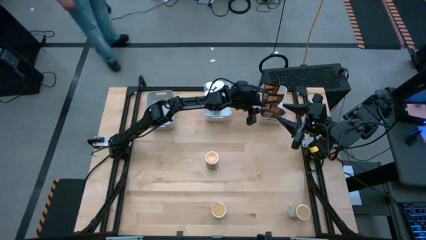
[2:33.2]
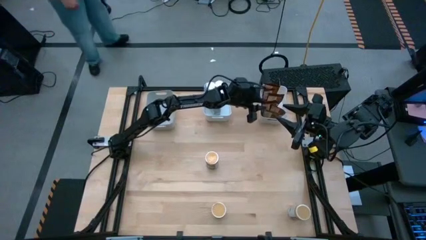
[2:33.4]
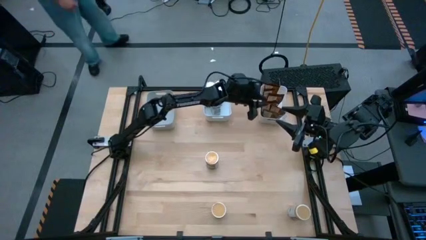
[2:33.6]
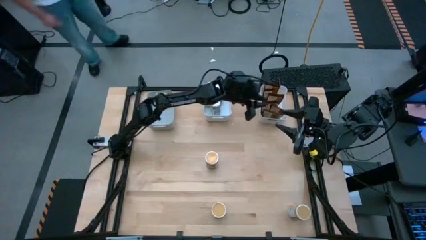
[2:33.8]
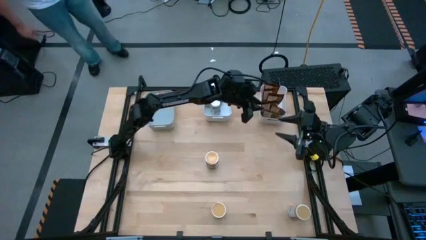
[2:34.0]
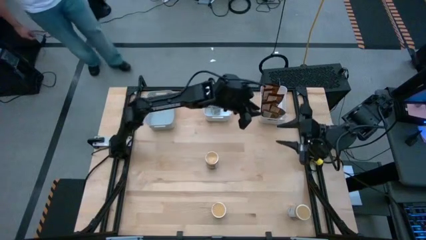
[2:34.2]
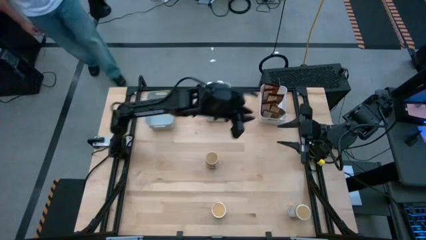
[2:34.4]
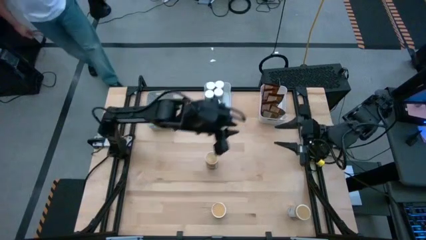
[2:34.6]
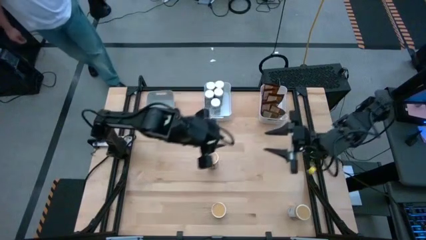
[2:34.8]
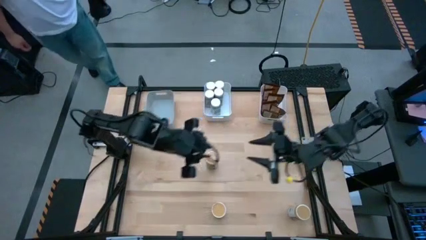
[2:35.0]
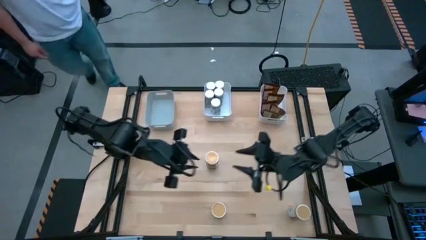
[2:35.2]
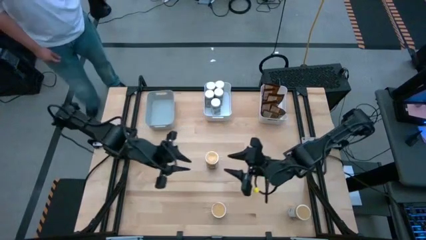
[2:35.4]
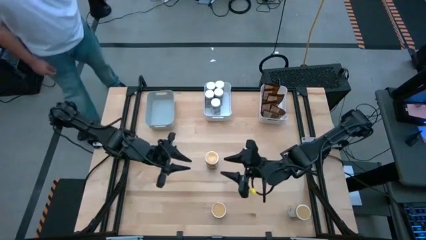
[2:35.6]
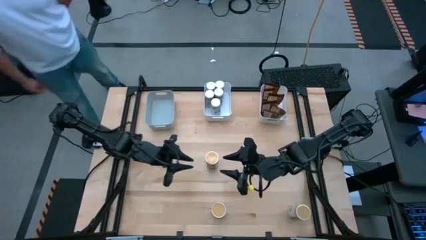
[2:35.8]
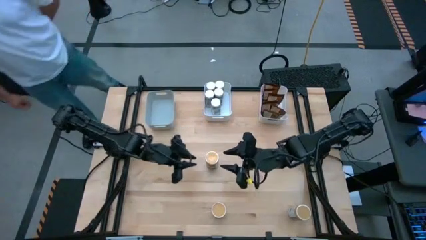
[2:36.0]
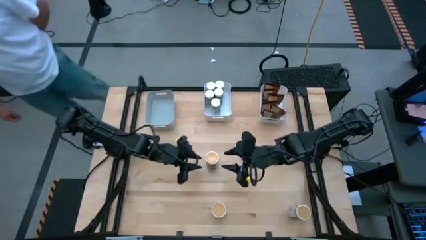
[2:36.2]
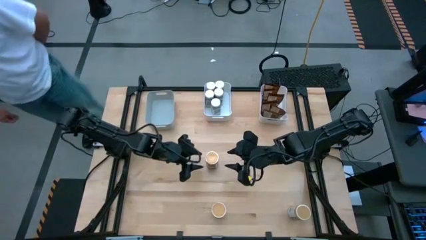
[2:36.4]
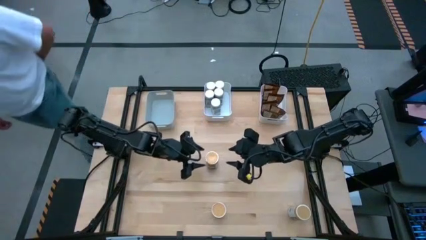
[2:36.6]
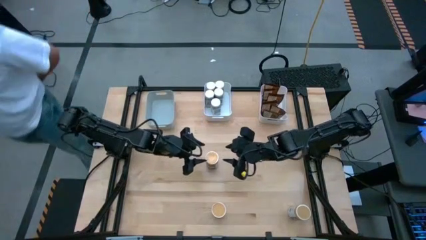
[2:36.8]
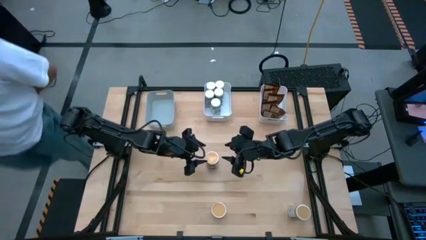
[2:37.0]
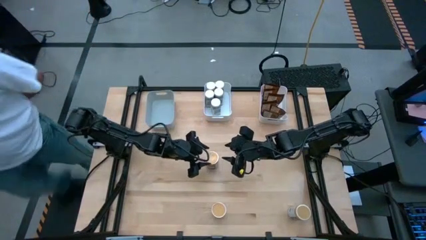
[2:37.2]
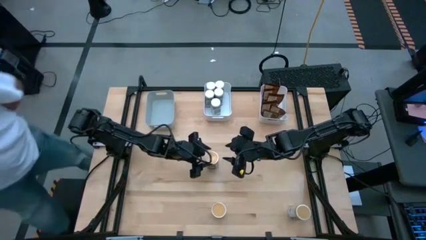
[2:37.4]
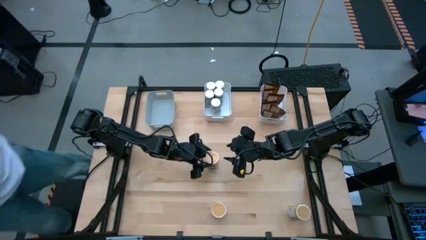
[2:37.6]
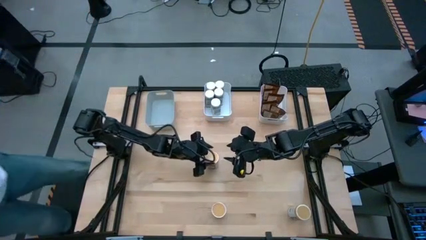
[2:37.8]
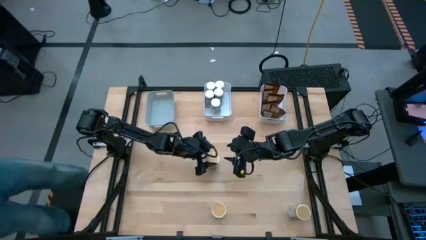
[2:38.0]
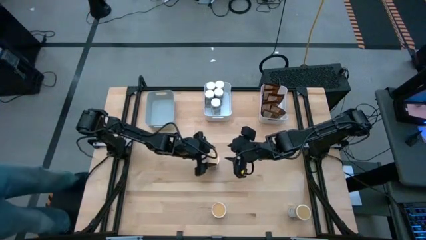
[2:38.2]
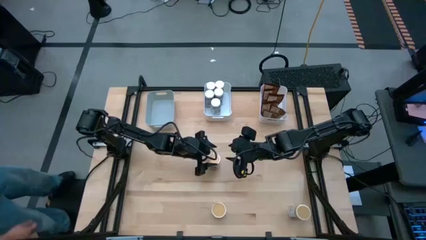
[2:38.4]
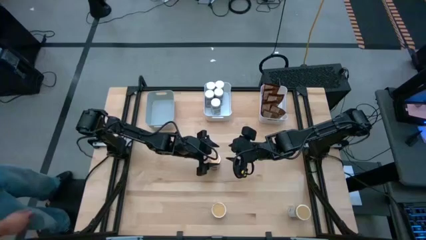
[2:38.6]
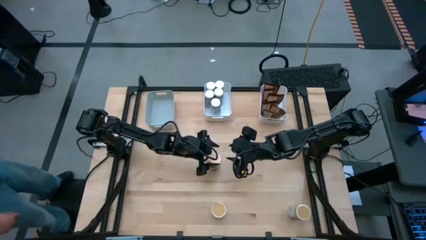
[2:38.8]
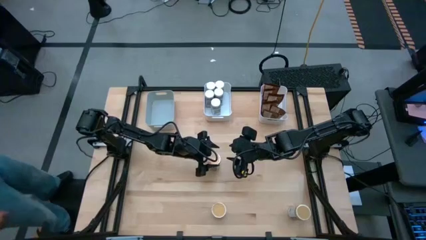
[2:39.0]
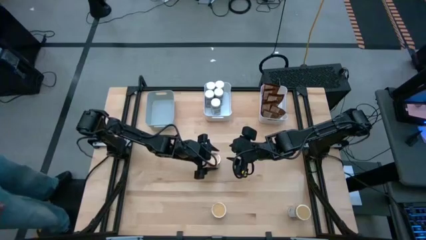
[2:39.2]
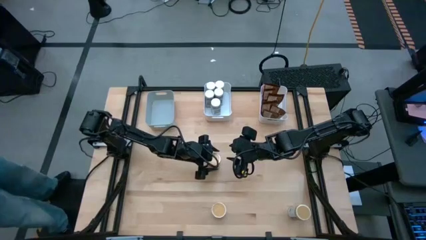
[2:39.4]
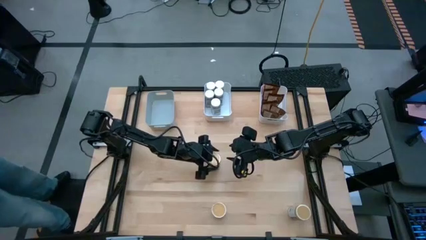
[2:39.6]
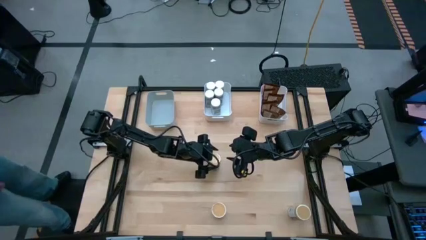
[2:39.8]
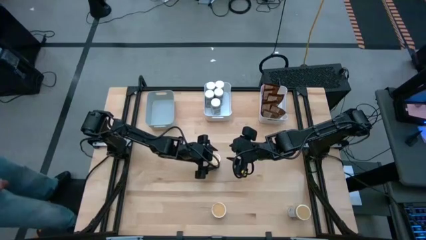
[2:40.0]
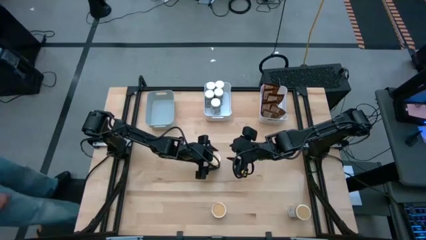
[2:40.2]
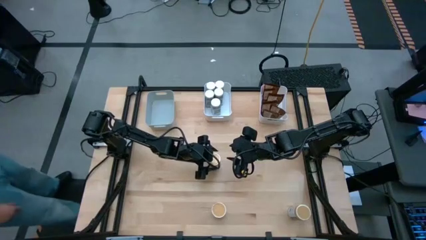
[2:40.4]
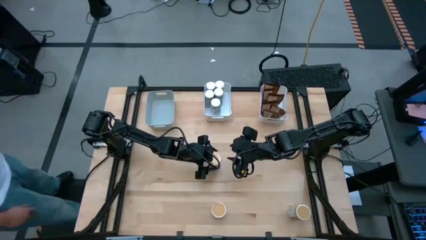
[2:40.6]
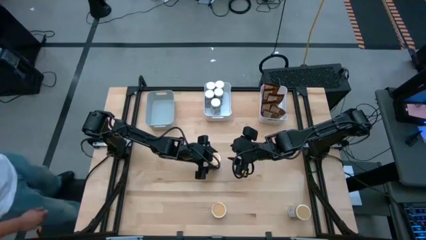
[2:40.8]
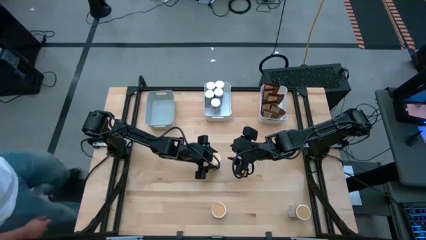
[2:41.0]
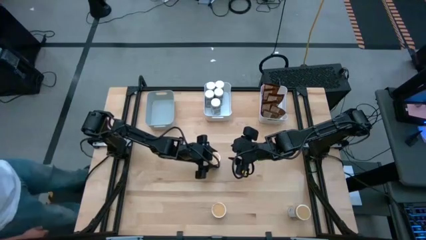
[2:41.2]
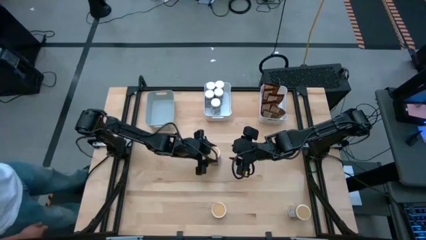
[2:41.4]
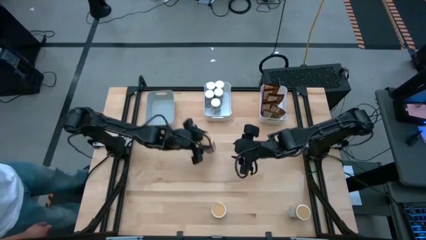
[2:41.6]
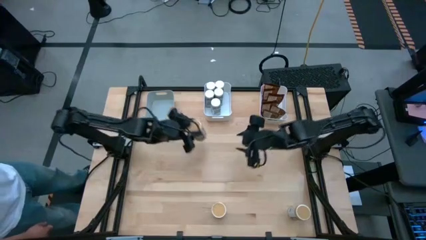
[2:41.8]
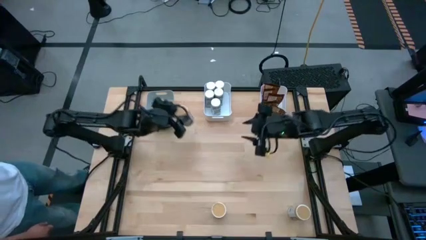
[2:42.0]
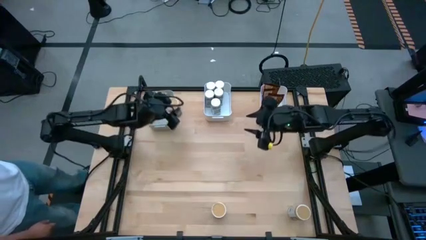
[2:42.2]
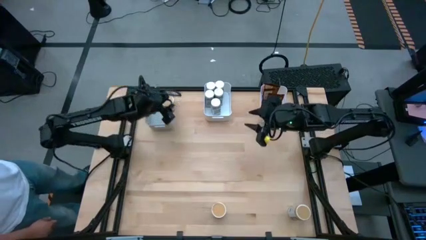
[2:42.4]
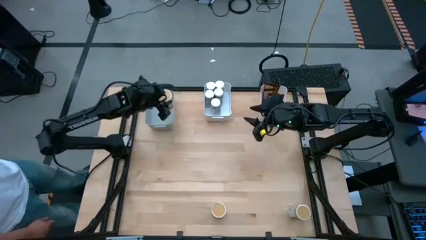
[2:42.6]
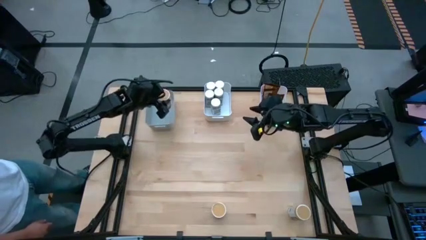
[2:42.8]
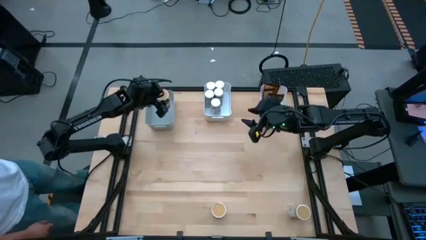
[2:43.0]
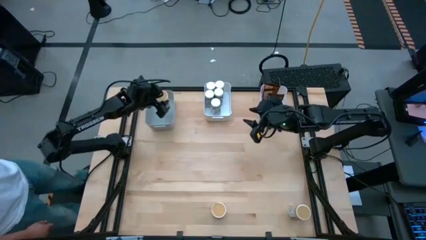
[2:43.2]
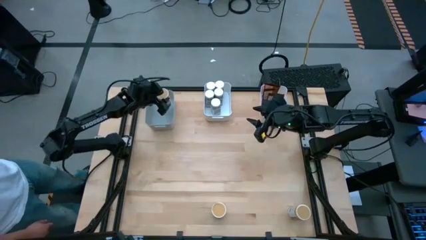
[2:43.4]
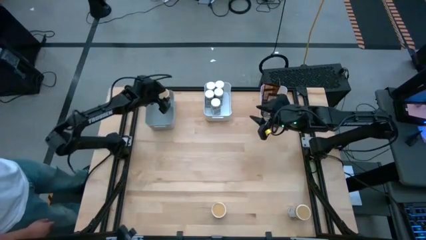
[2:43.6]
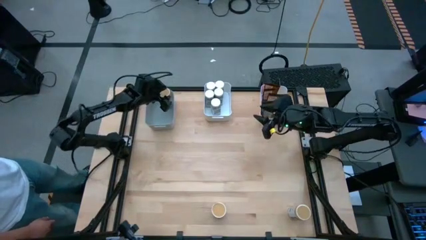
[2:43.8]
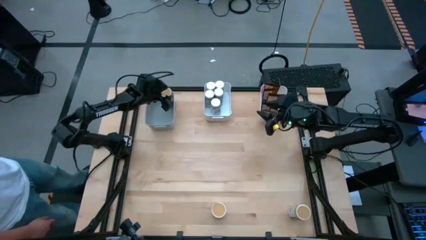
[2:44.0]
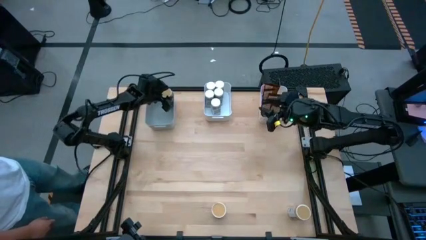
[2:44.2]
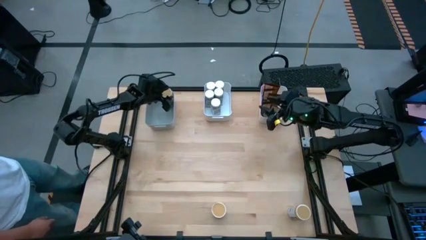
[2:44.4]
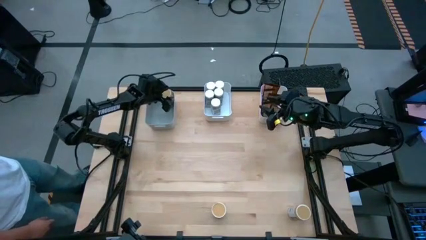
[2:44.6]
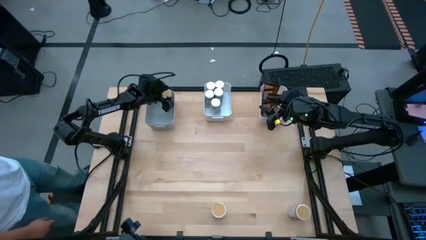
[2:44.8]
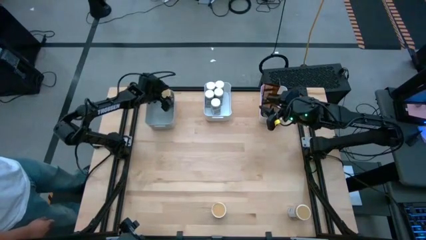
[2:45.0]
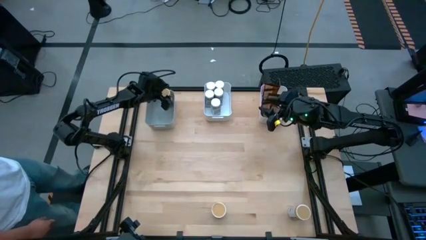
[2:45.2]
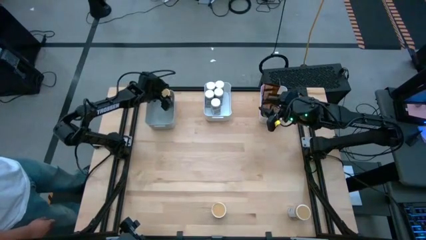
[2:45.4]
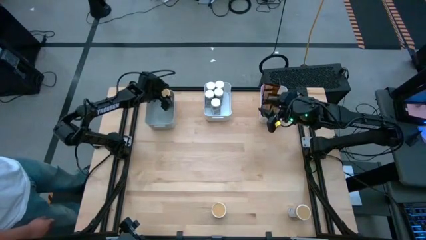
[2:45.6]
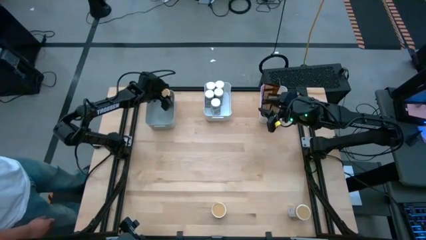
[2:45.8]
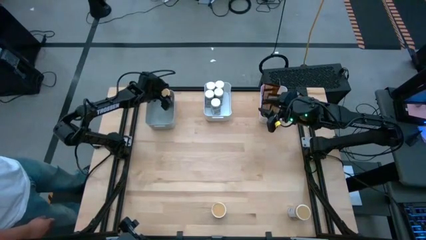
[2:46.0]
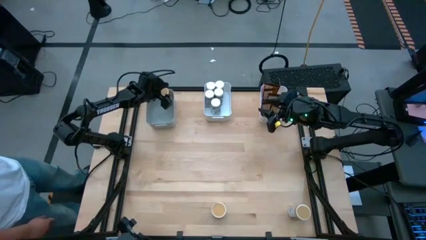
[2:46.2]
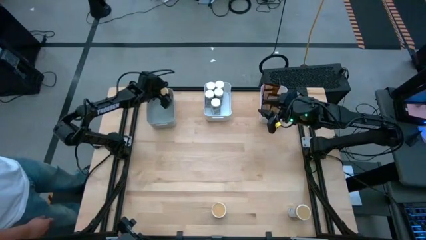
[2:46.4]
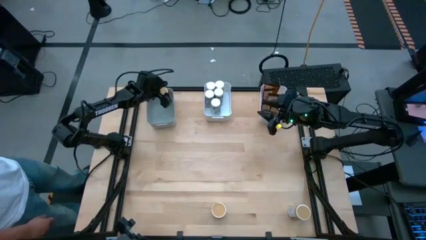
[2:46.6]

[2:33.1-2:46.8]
Task: Sort spices by type
Put the gold seasoning bottle into the gray bin

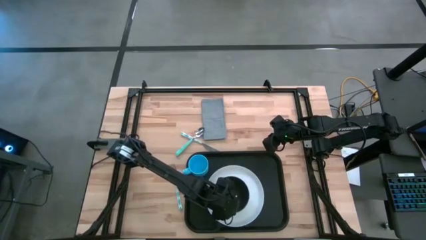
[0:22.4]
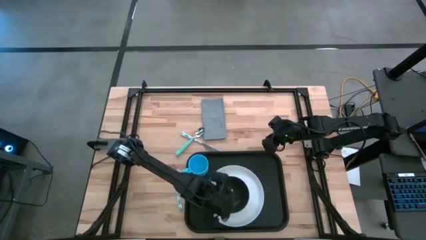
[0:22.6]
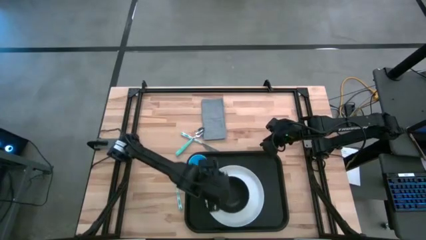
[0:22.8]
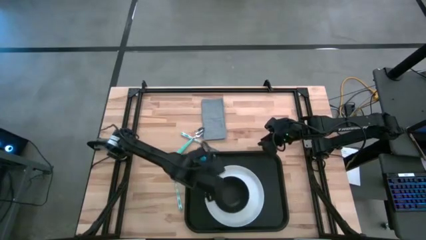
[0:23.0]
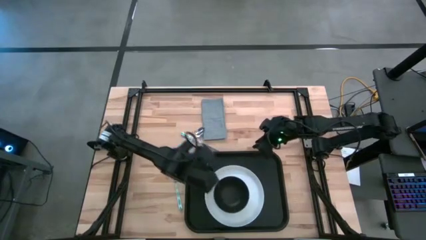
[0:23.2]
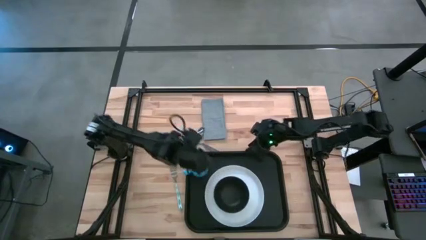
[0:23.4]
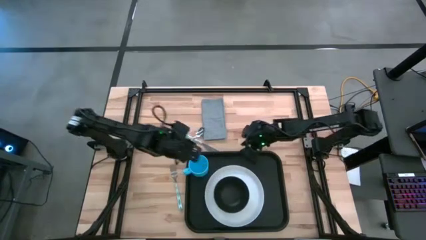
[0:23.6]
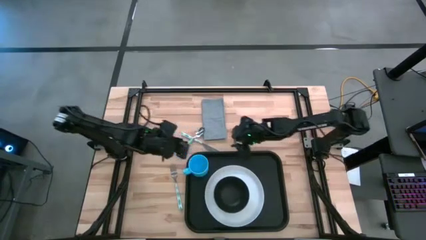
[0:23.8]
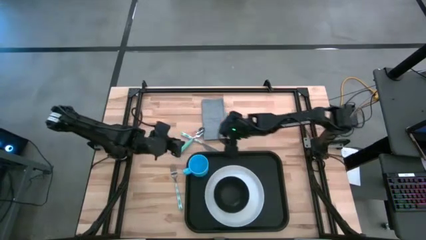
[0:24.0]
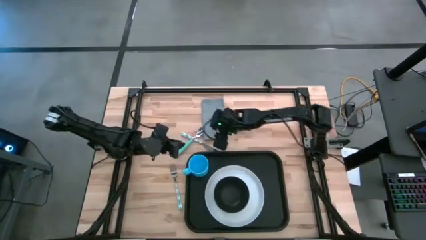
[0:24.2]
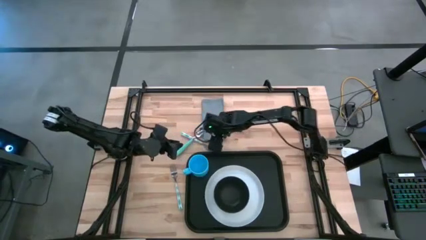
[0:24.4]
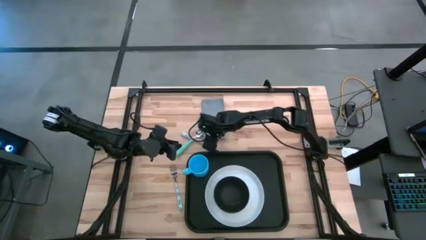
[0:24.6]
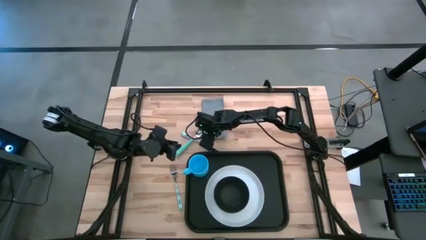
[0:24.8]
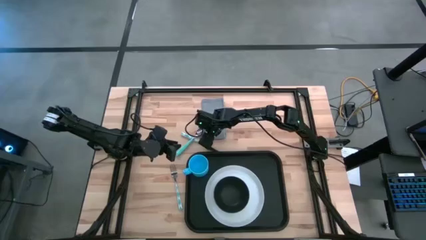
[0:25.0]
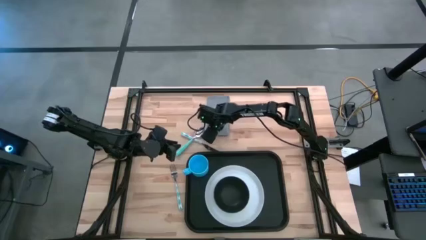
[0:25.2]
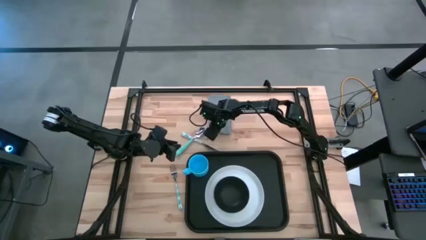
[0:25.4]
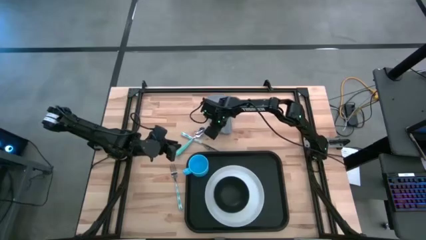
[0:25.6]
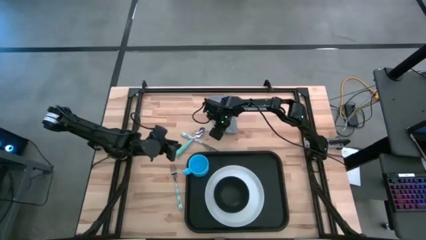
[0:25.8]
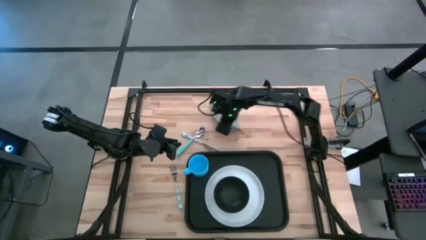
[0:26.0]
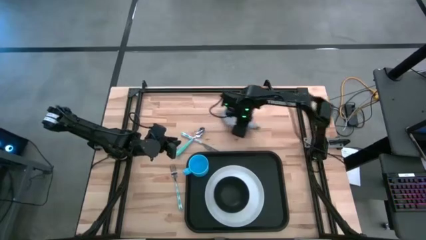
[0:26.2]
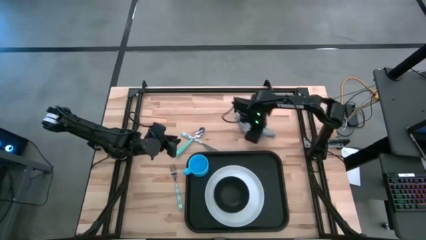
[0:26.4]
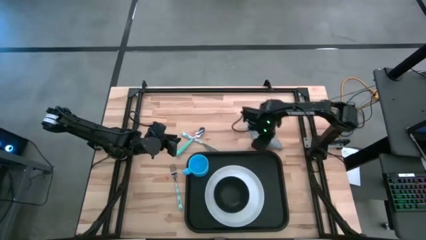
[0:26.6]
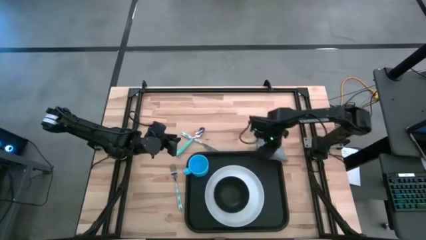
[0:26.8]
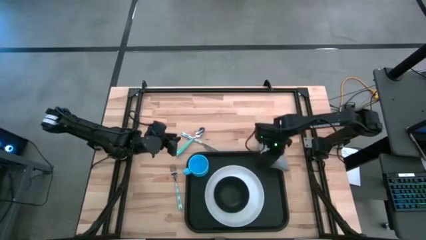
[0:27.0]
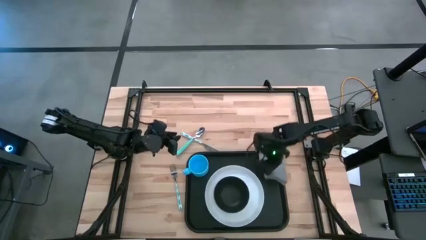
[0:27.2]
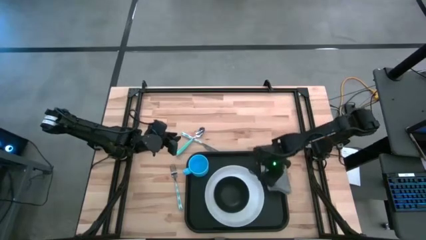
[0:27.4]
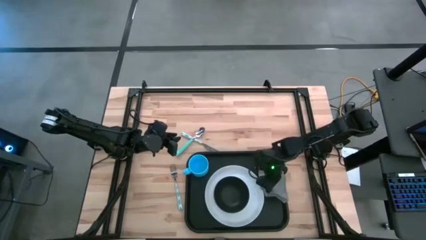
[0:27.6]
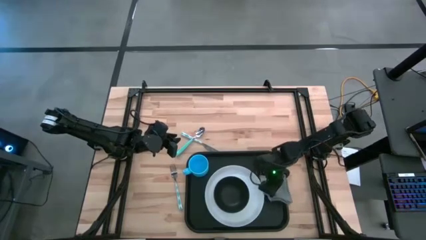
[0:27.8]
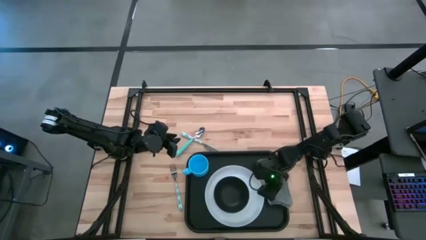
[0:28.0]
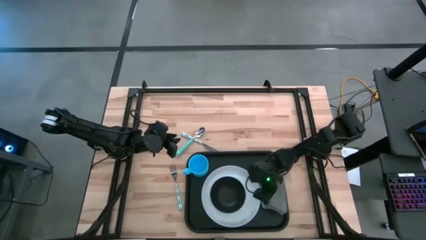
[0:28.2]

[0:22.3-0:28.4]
Task: Set up tray
Put the gray napkin on the black tray to the right side of the white plate
